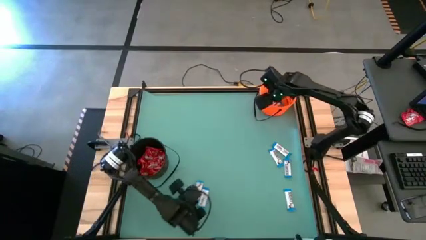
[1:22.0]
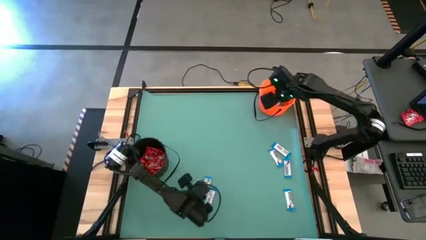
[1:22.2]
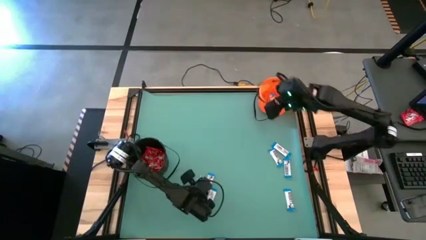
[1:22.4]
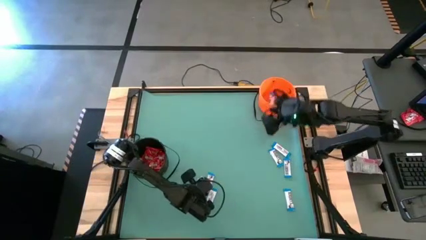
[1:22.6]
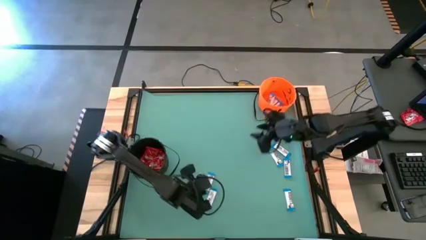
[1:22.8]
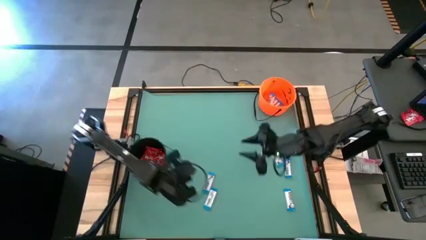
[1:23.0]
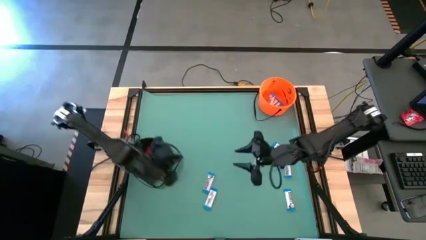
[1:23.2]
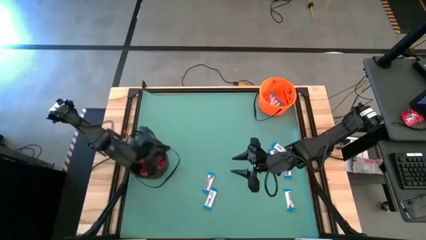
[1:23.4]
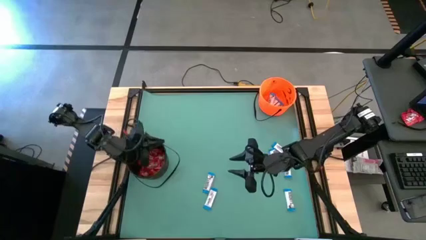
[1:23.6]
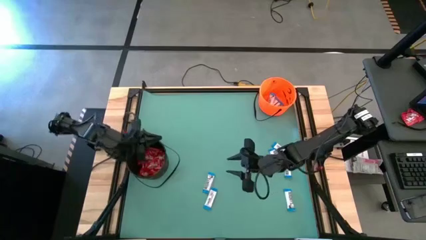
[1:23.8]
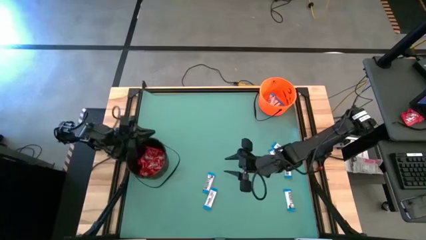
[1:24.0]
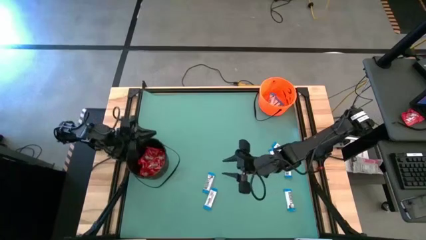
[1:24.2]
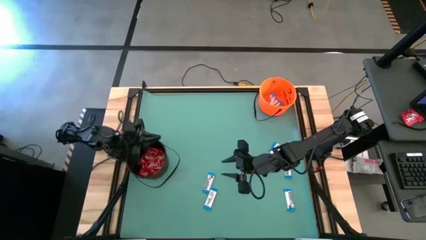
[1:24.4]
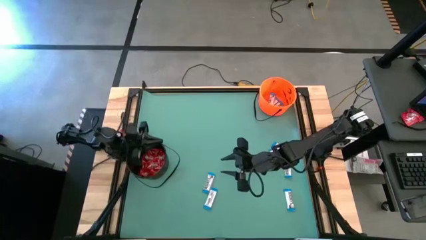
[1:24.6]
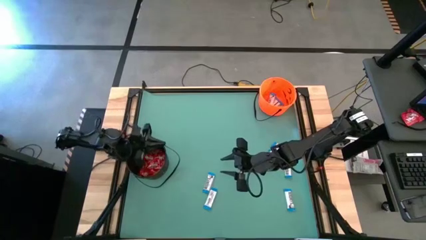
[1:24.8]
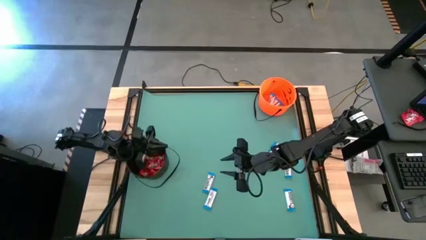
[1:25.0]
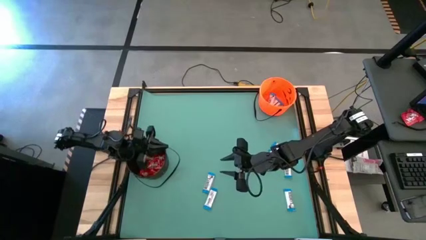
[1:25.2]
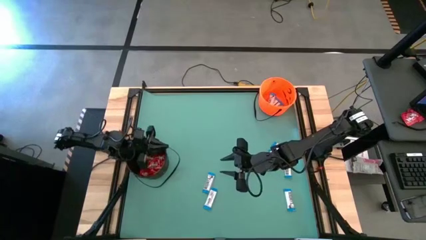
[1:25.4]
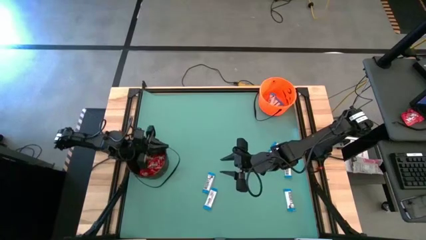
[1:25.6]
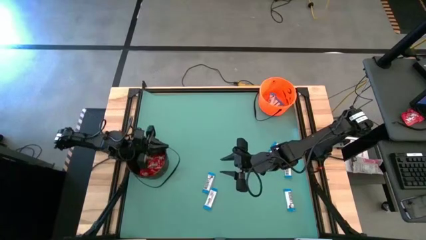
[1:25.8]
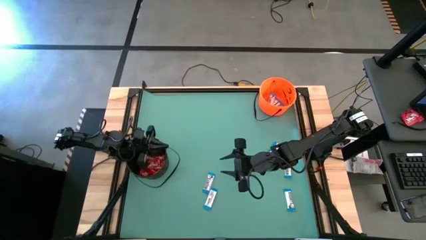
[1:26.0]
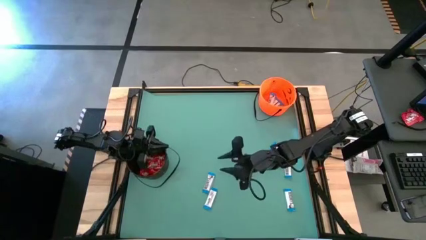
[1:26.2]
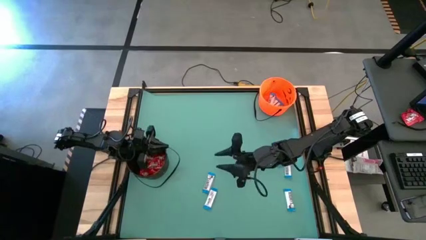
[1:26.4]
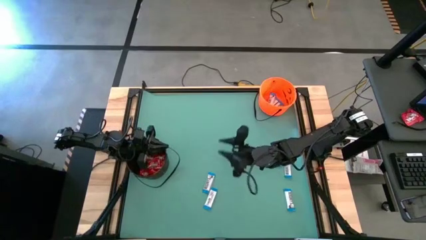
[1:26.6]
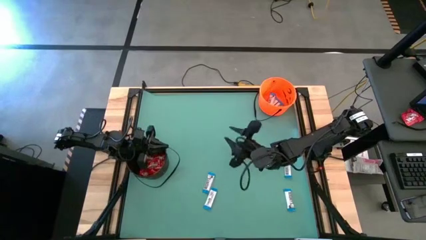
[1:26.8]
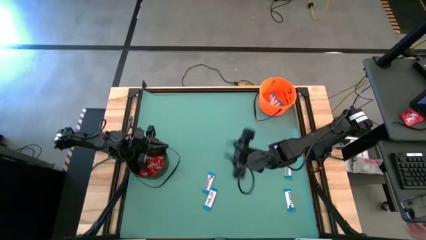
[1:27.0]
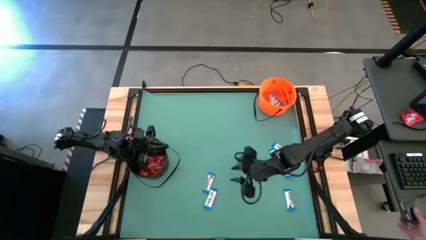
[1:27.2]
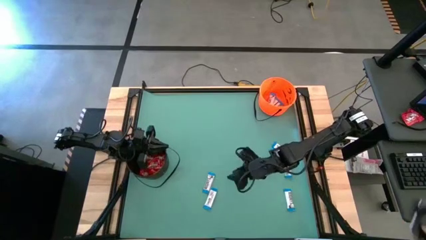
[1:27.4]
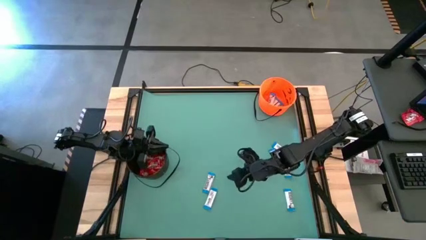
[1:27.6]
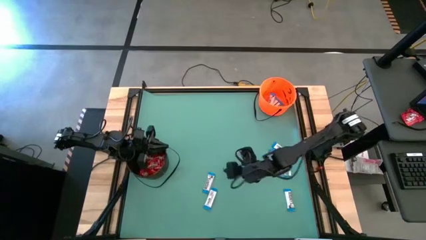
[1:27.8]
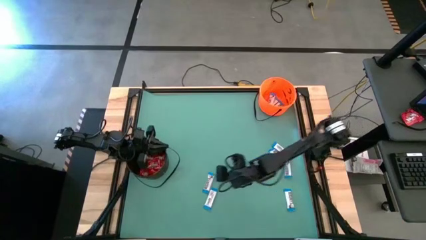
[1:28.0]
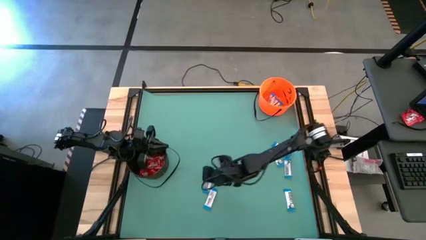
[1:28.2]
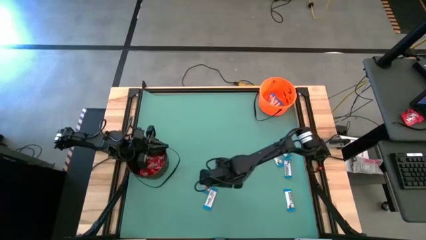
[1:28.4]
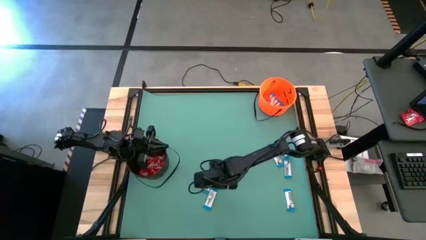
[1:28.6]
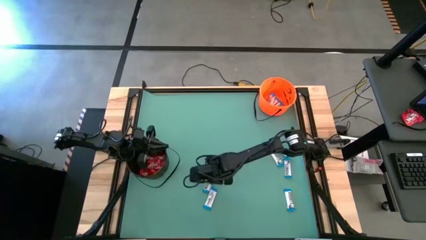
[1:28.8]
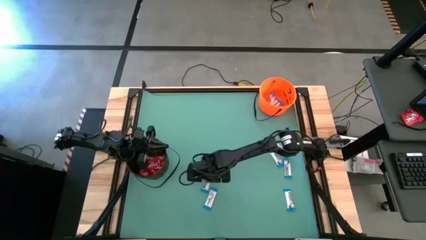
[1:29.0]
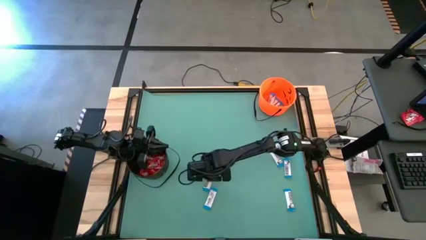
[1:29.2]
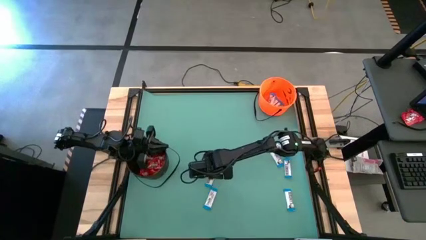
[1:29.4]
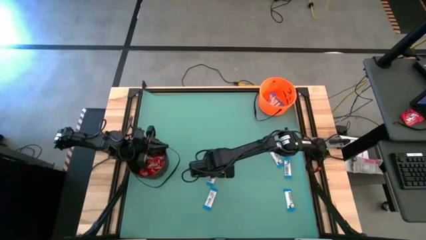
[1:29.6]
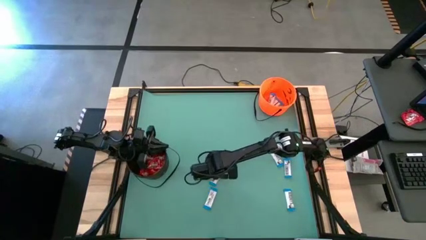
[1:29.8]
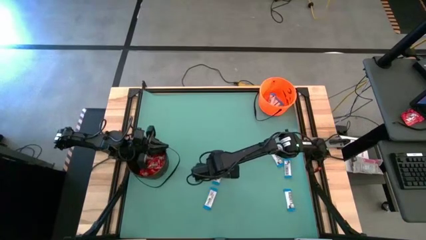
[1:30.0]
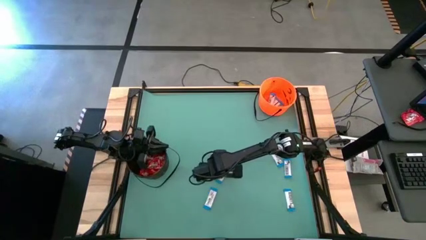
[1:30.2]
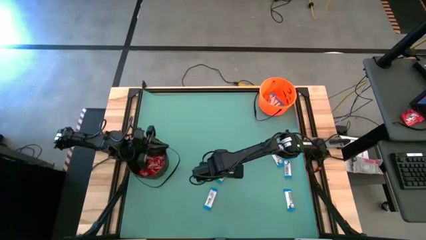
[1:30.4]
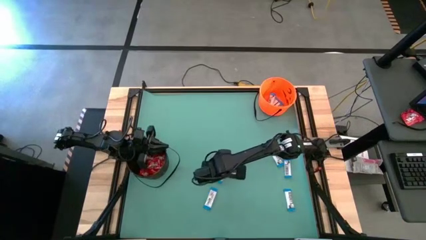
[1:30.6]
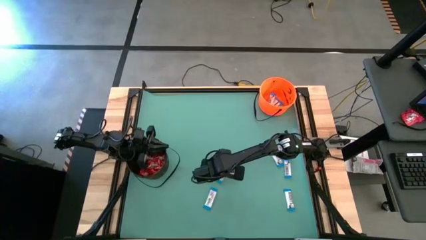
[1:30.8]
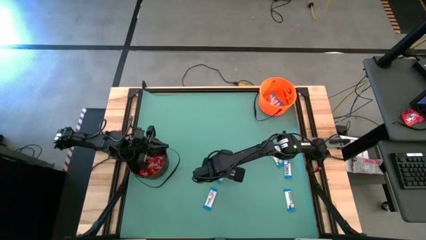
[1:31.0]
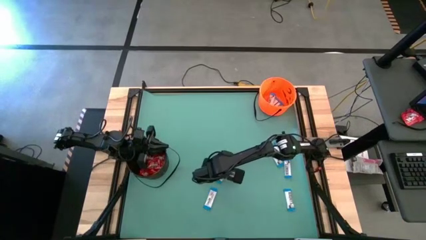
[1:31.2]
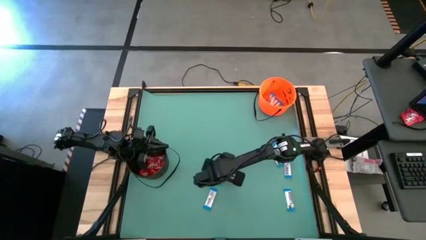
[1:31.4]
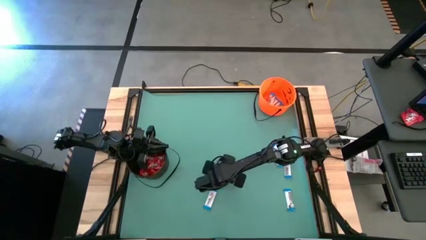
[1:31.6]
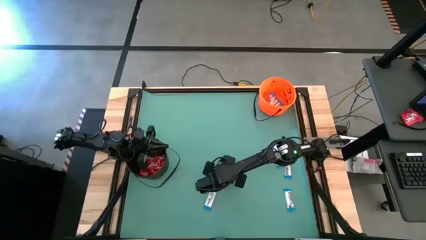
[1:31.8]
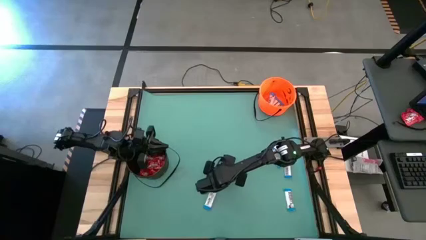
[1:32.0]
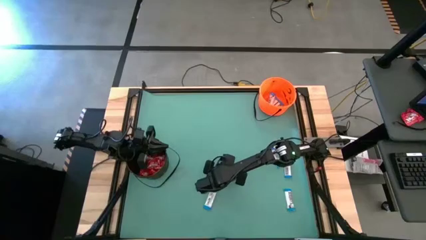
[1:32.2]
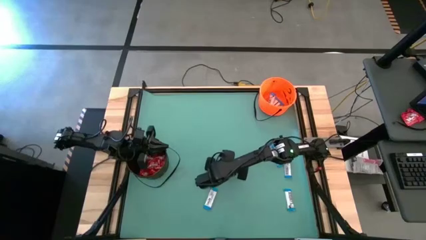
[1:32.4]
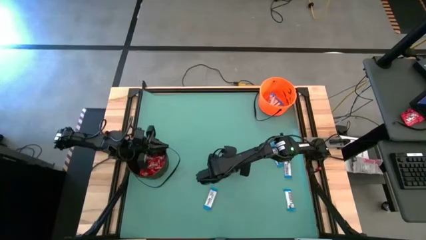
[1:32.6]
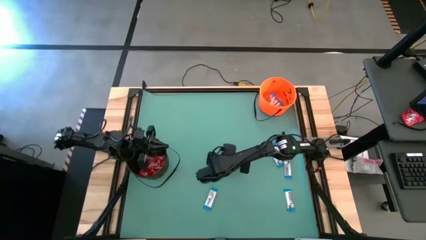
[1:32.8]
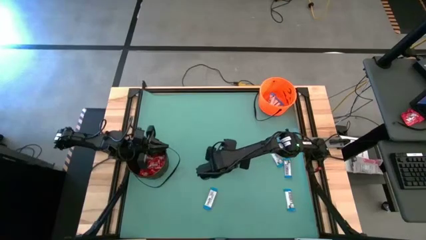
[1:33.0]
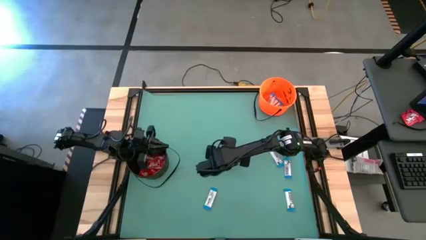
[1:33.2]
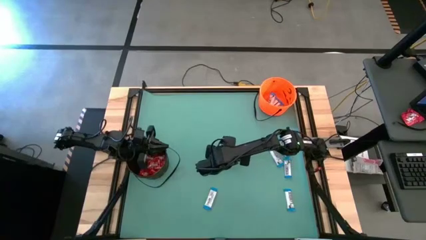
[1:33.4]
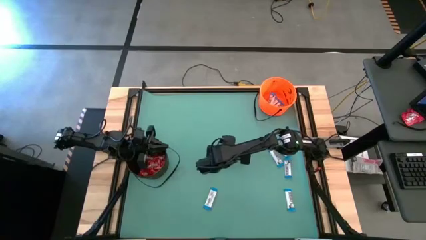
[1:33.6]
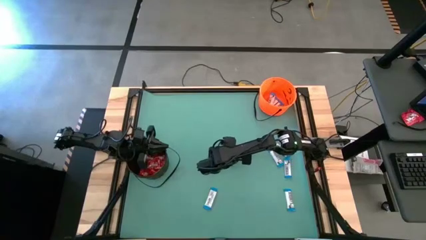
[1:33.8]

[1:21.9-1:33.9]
Task: Sort candy by brand, put in halloween buckets
Put the white chocolate into the orange bucket

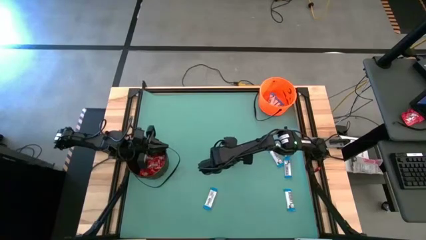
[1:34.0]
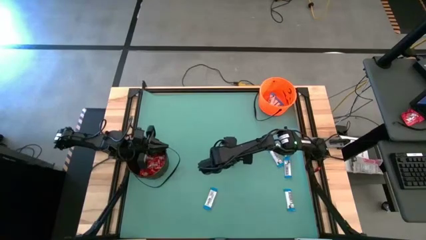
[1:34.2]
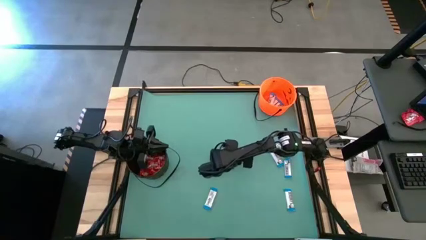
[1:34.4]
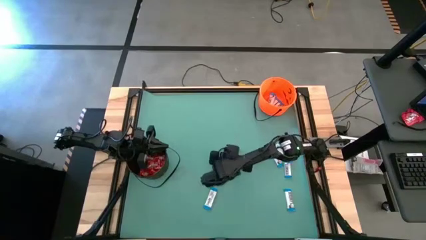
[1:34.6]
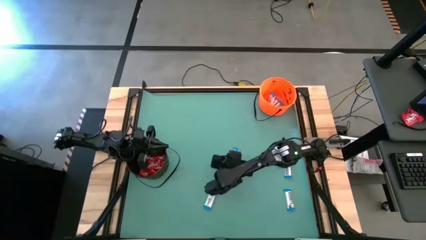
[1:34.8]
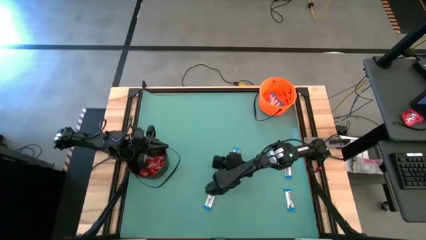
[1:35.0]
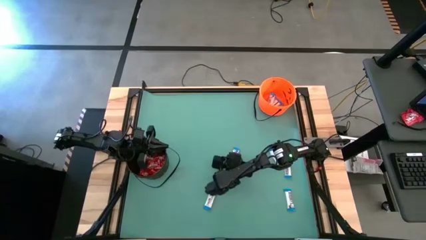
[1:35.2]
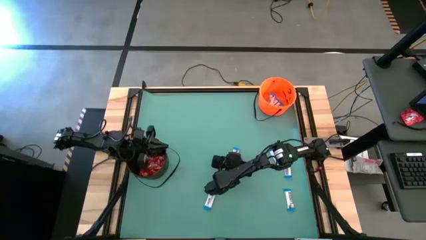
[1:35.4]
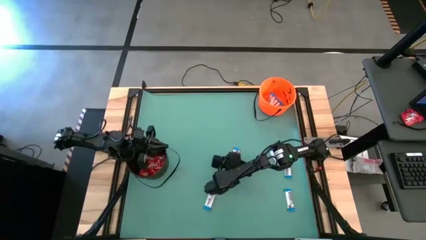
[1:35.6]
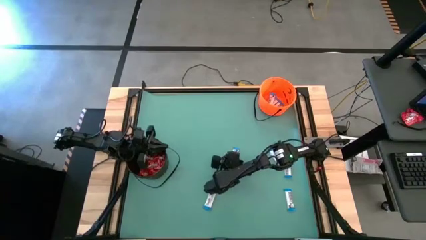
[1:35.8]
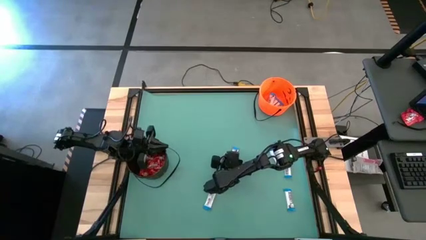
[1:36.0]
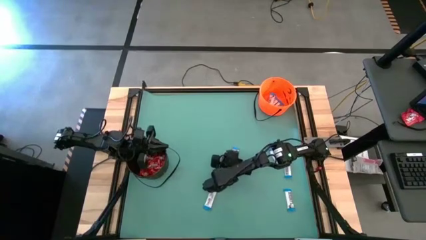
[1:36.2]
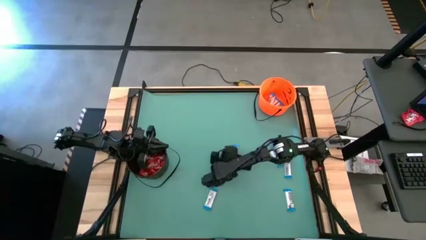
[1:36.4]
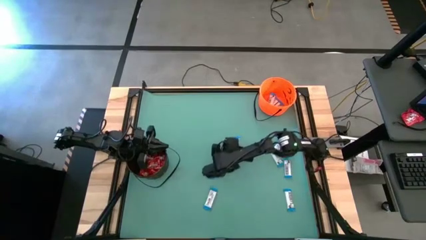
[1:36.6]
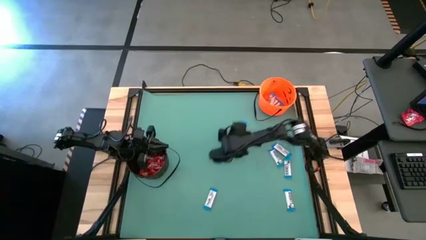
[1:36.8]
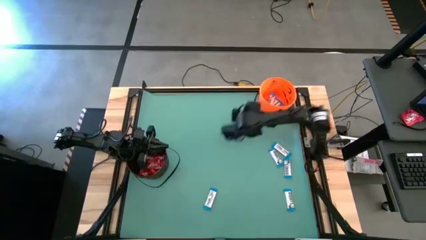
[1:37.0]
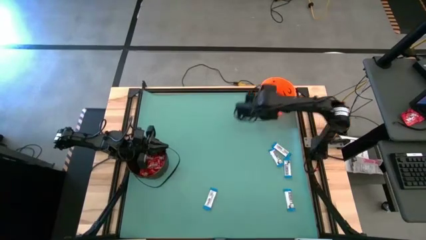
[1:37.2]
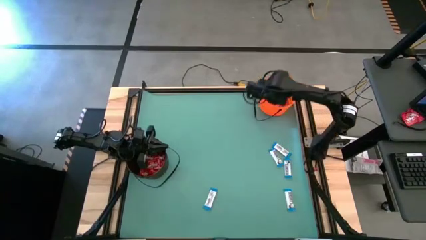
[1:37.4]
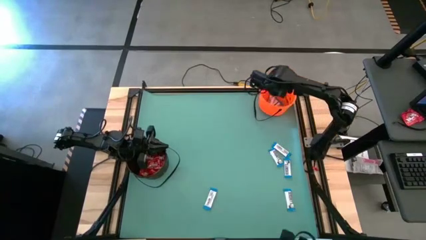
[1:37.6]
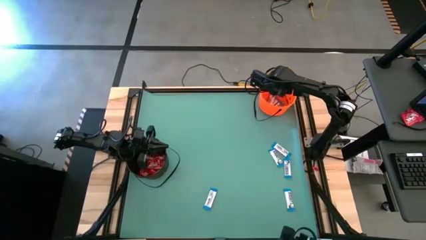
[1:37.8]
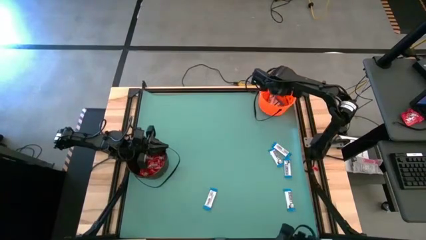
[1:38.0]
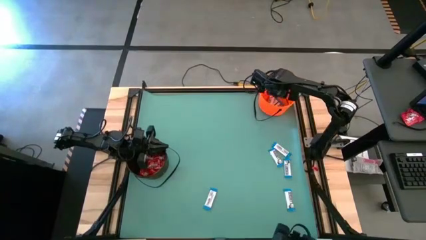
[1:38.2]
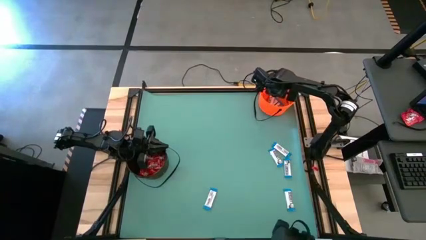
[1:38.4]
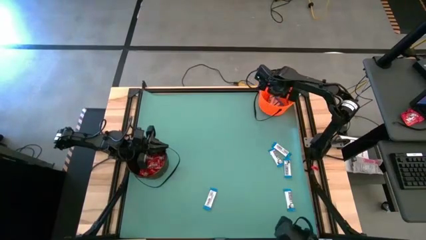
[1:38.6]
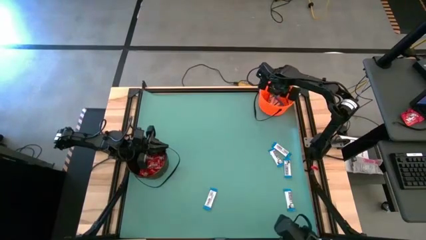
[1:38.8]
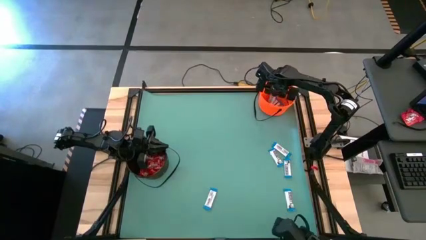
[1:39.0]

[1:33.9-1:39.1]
Put the white chocolate into the orange bucket
